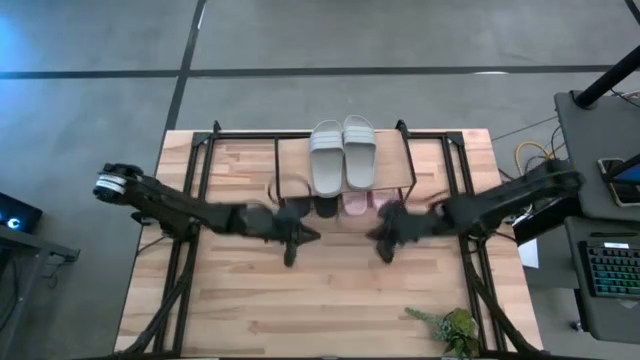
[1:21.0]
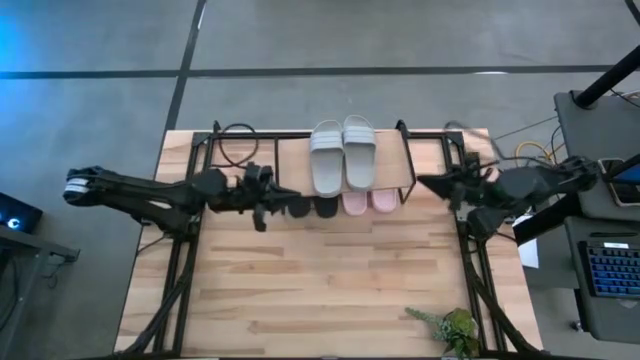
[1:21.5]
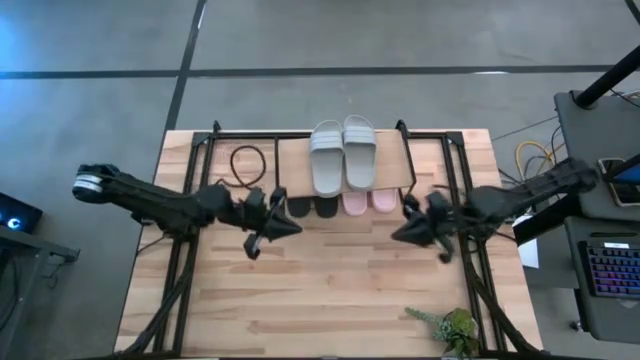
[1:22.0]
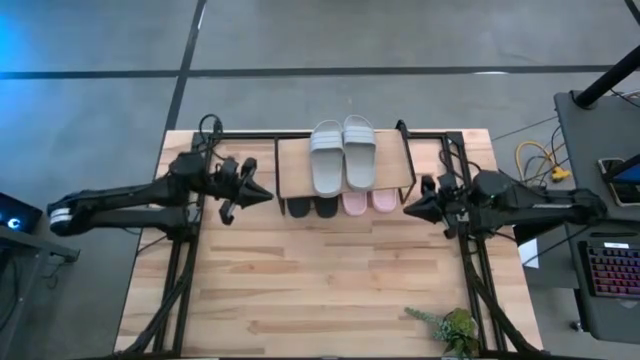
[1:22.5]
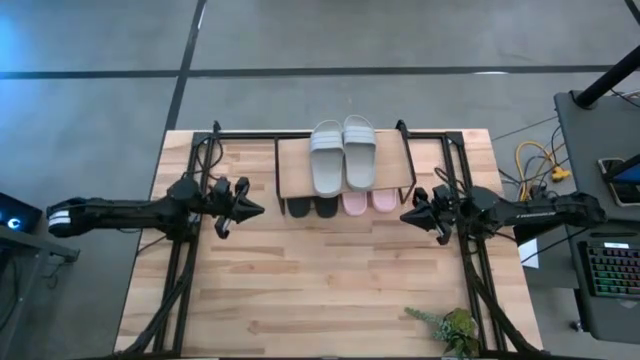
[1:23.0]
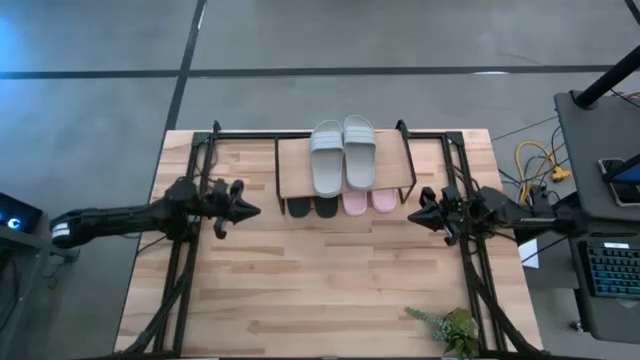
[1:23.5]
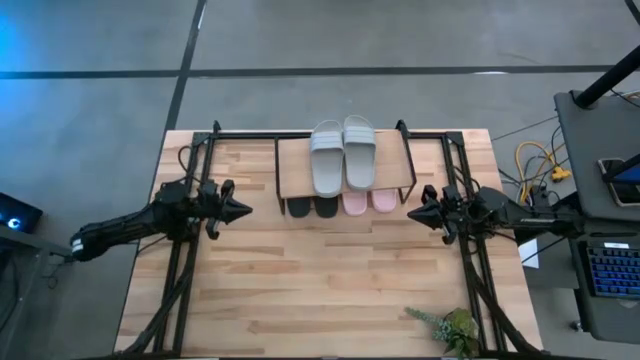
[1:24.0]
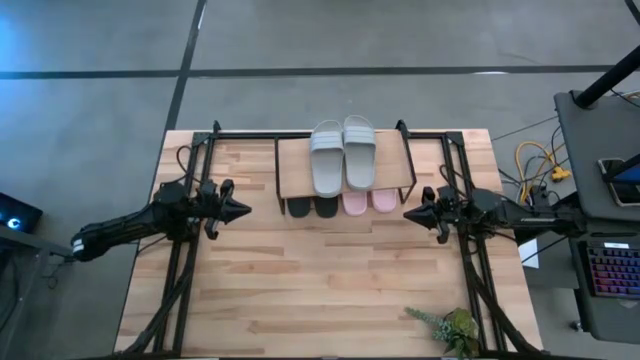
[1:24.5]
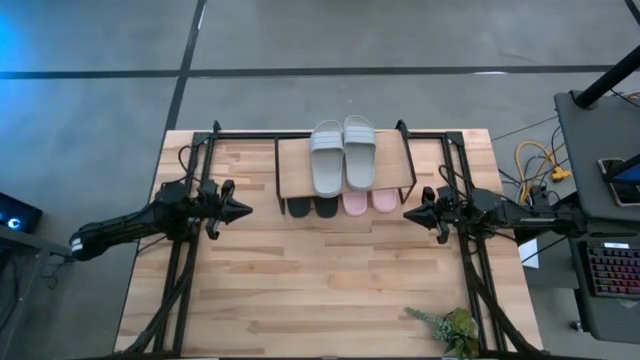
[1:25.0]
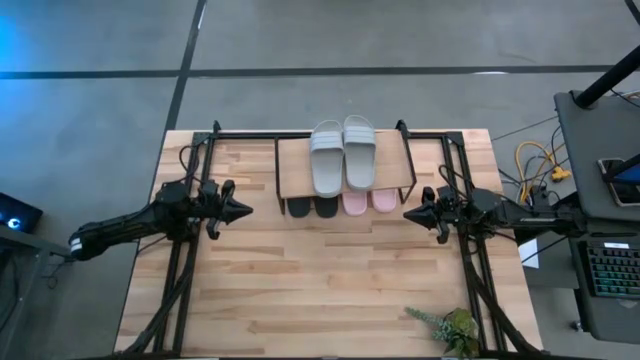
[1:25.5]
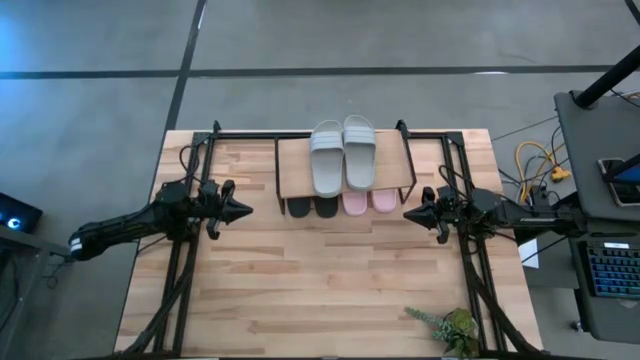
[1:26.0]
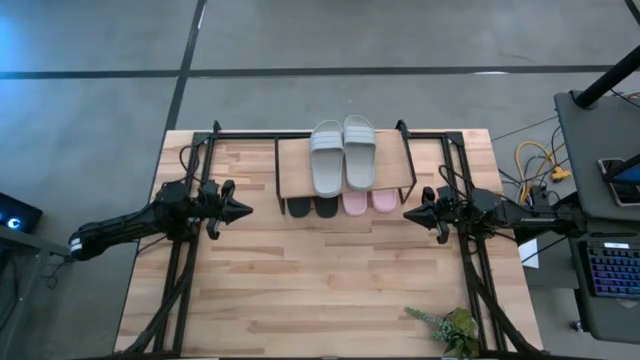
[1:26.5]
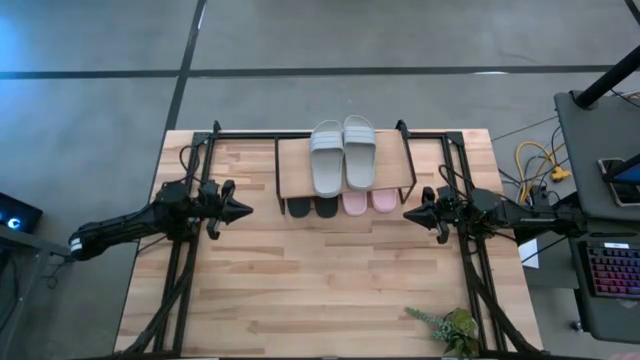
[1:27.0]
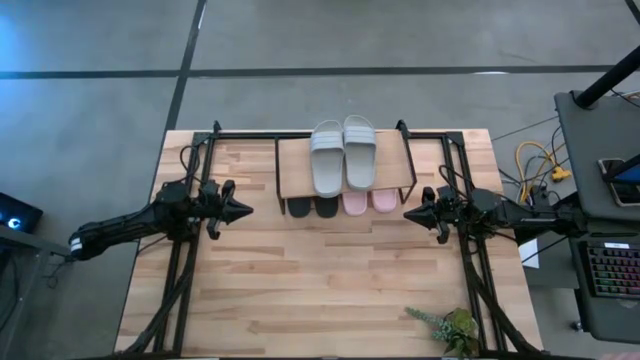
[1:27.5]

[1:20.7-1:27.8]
Task: Pick and place slides into the shelf
Return to Home Position

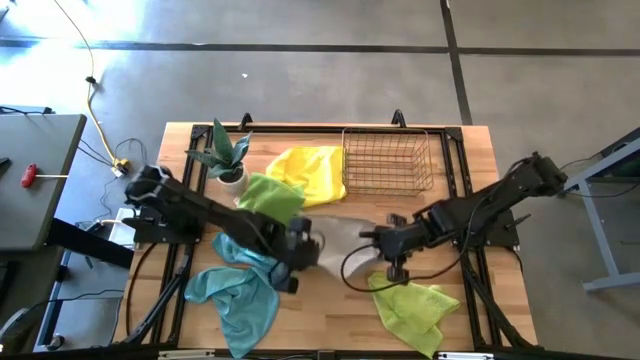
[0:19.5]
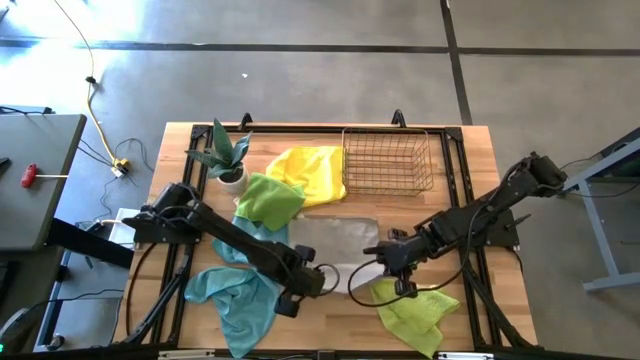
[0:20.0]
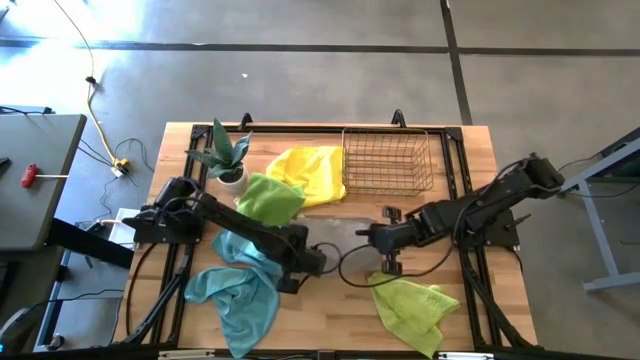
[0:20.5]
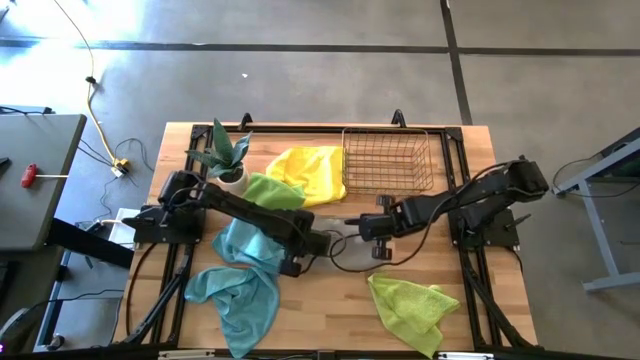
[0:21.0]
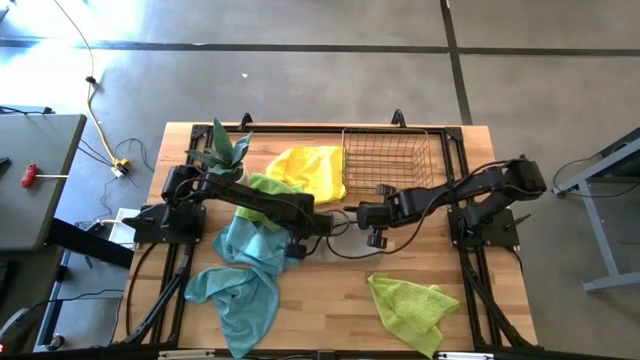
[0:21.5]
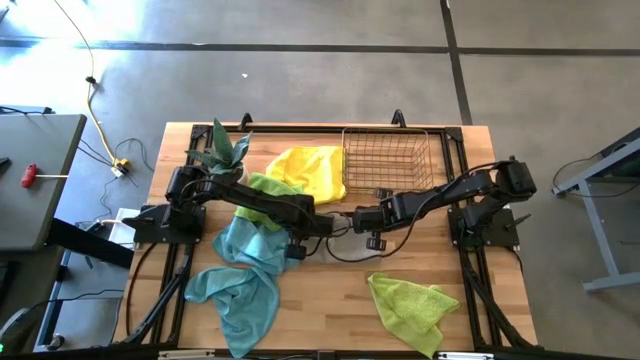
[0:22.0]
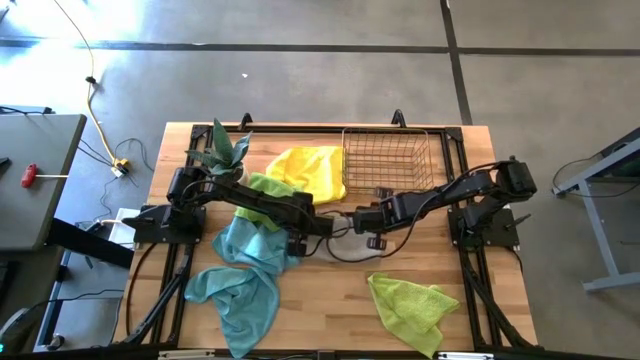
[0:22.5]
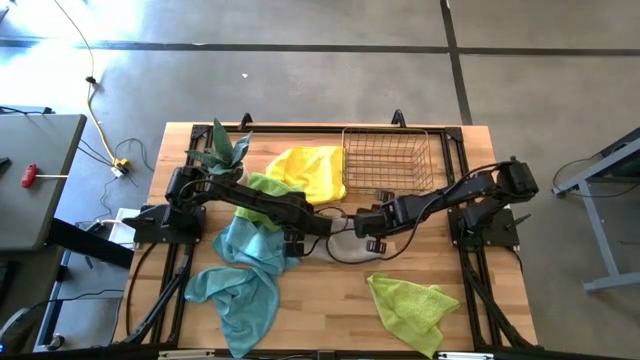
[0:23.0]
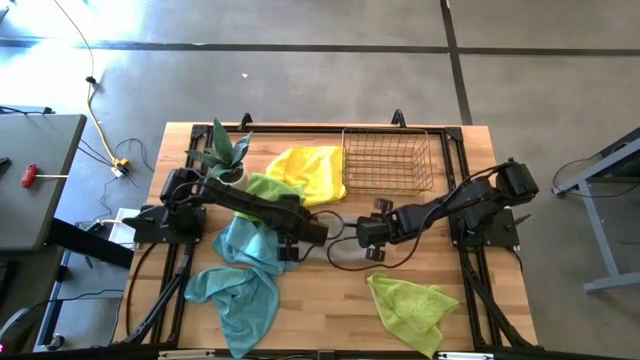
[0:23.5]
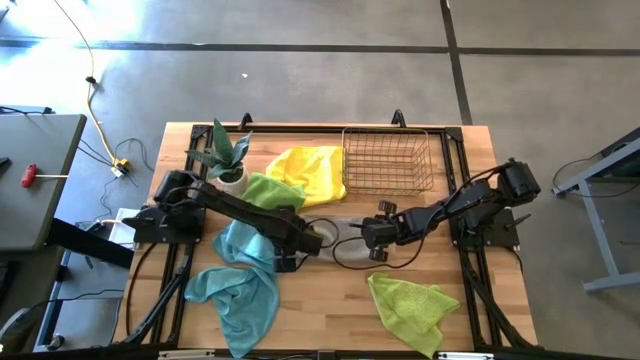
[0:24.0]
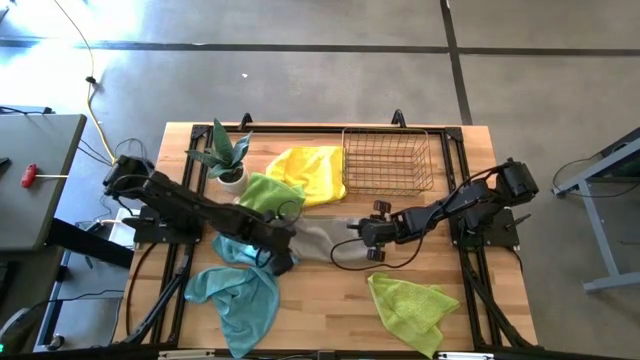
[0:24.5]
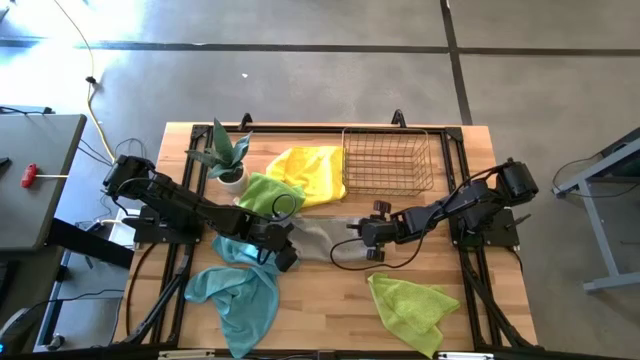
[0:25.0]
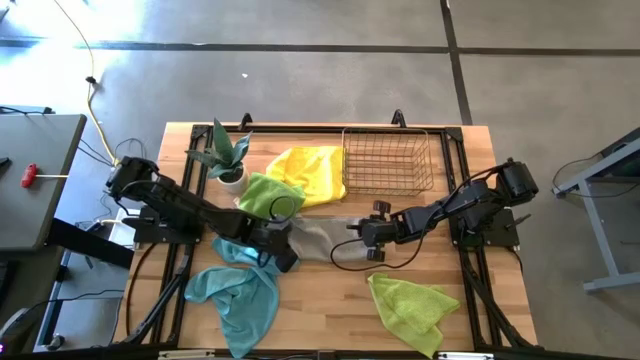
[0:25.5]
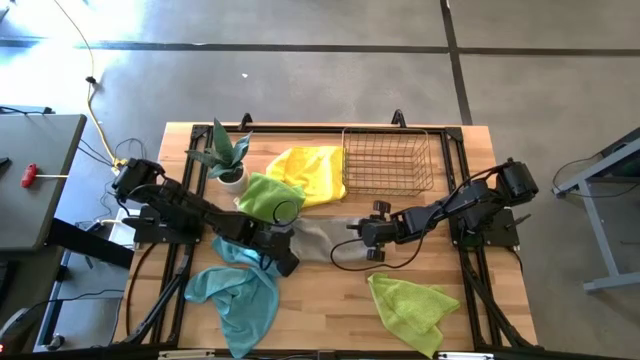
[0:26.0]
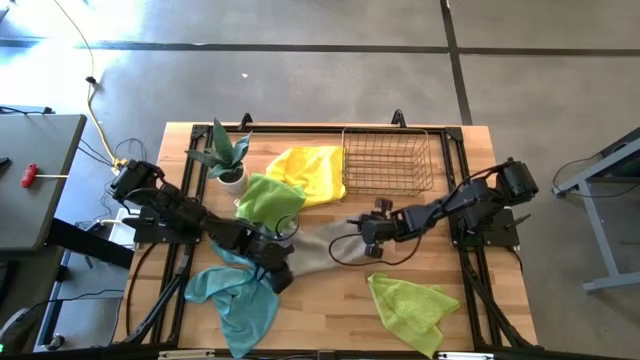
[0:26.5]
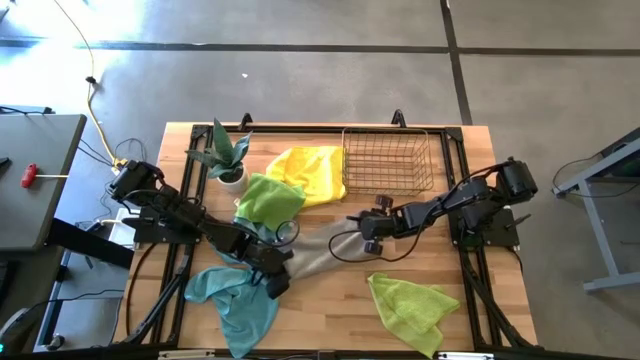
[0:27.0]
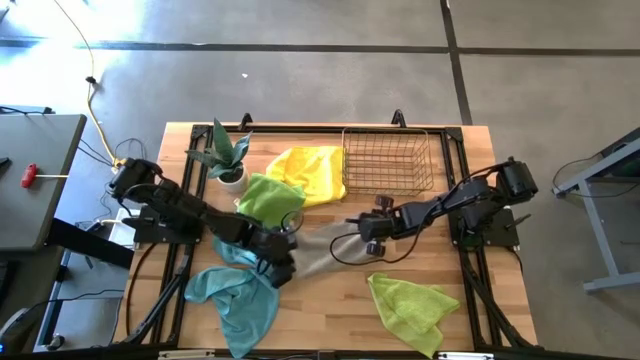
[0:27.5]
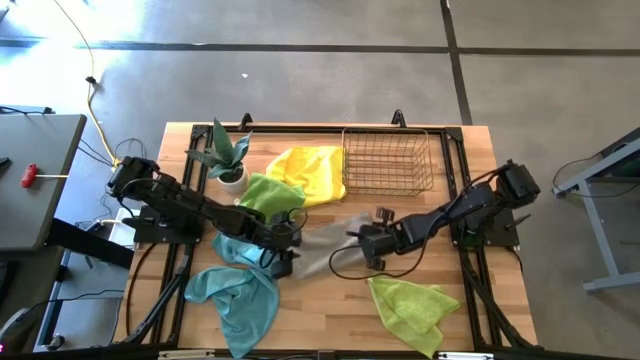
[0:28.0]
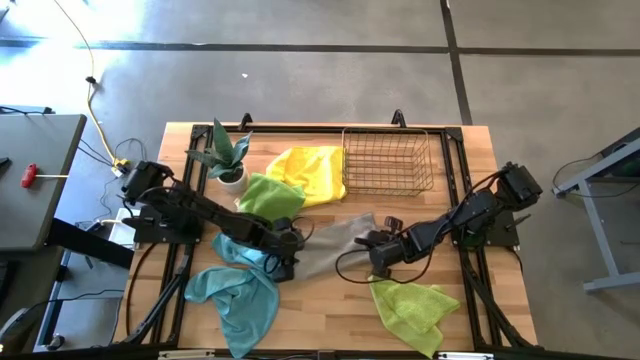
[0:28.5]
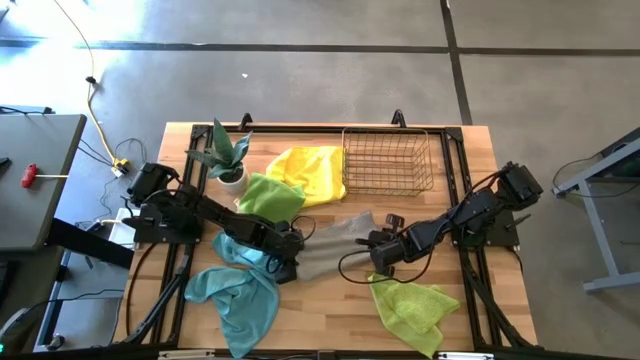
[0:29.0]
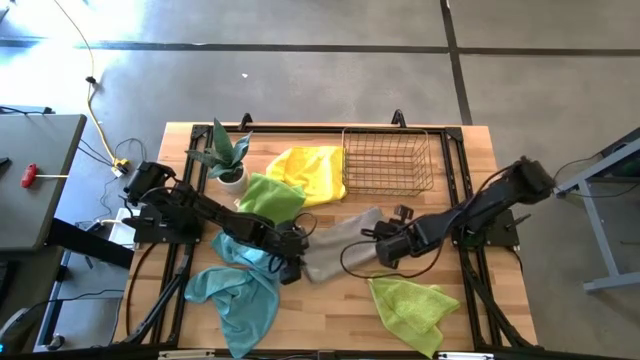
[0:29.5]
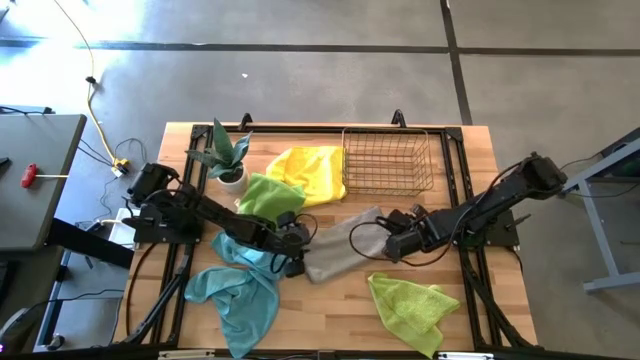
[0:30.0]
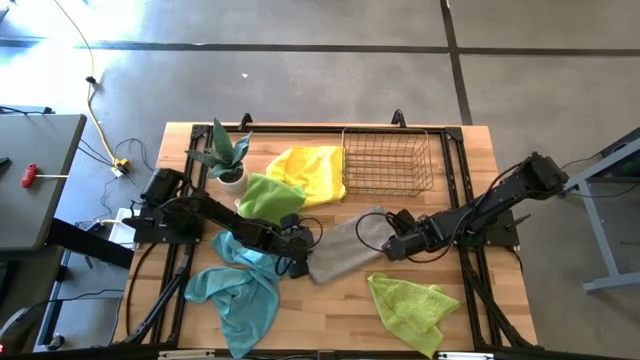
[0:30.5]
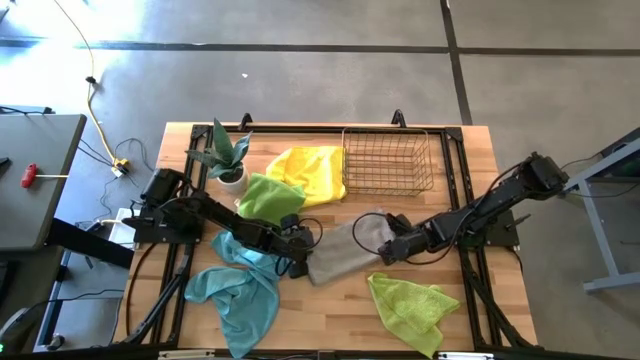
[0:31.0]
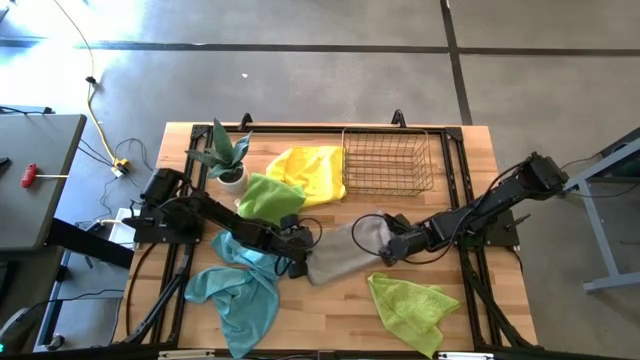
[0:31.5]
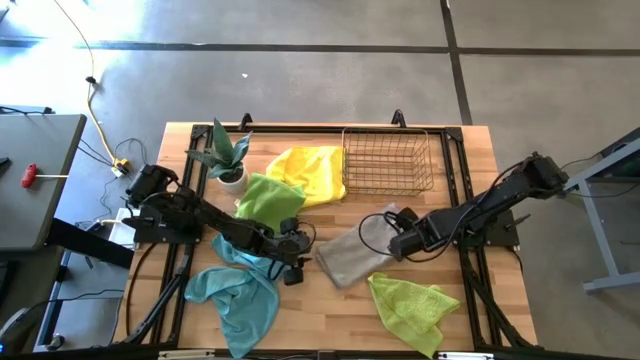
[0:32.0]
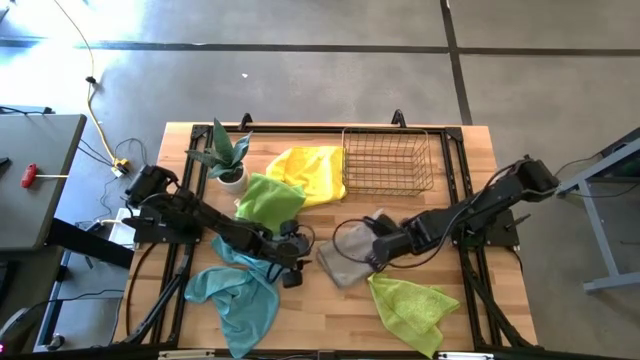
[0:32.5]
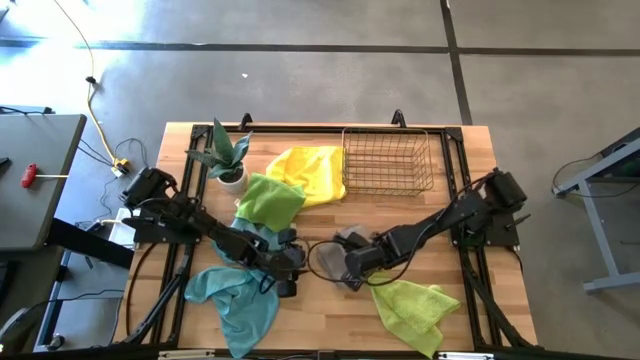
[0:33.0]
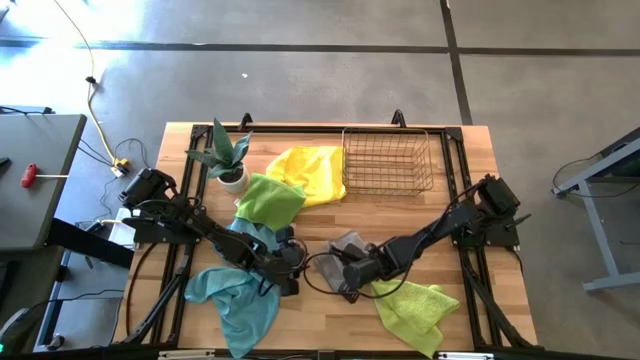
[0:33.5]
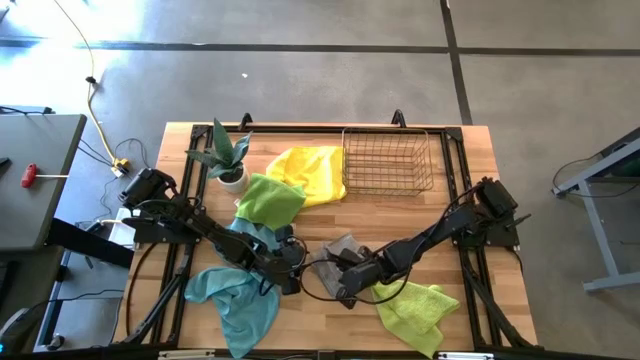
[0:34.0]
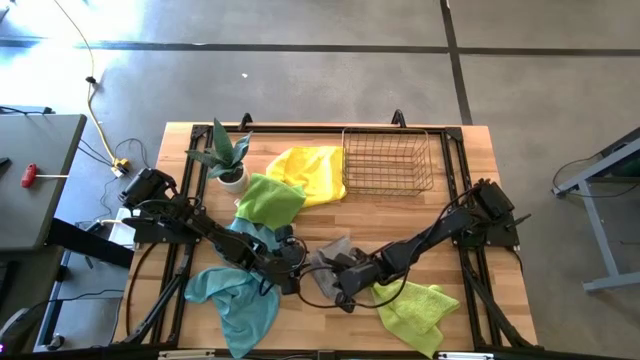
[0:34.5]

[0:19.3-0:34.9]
Task: Fold microfiber towels
Fold the gray microfiber towel
